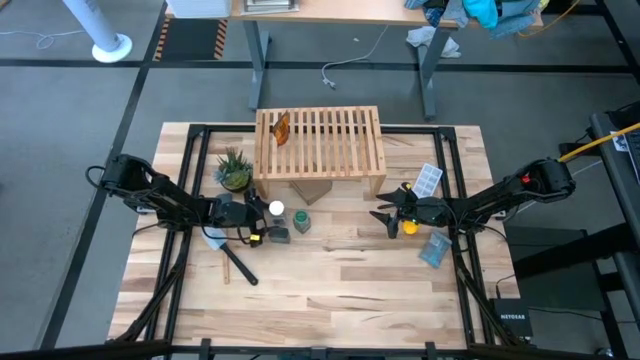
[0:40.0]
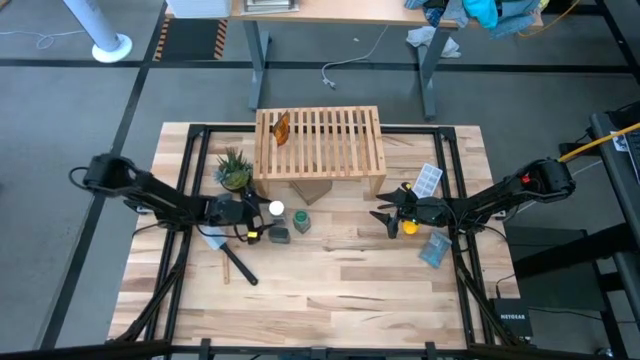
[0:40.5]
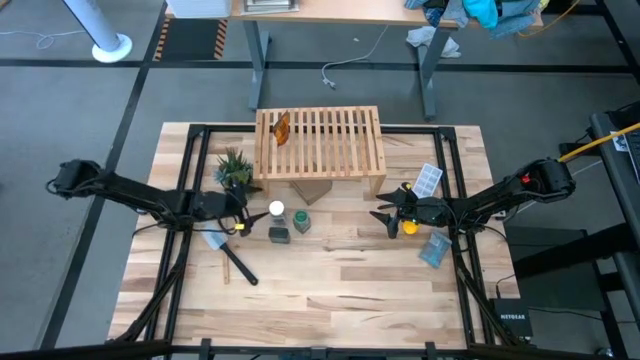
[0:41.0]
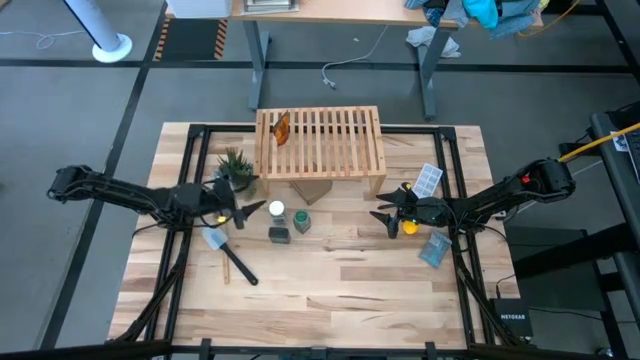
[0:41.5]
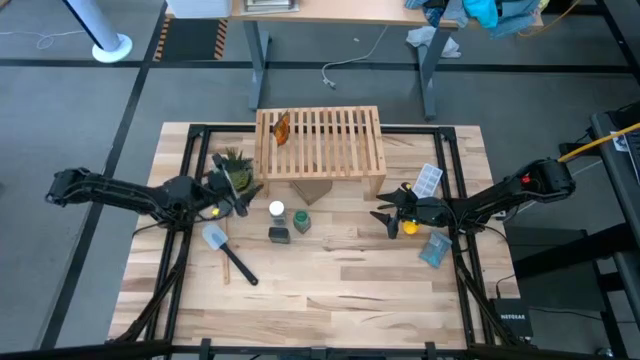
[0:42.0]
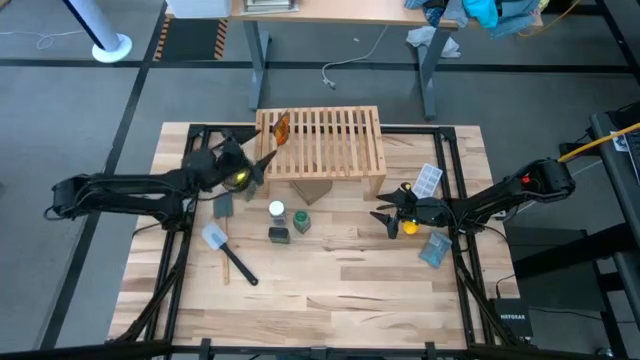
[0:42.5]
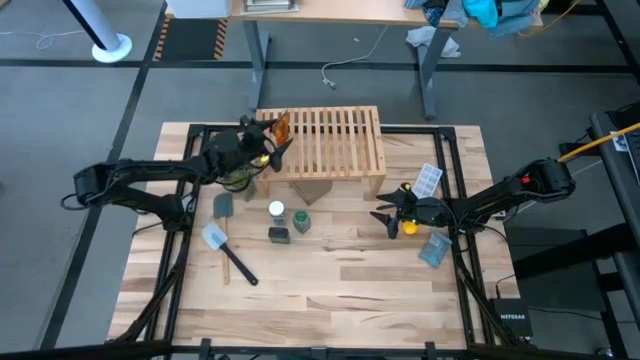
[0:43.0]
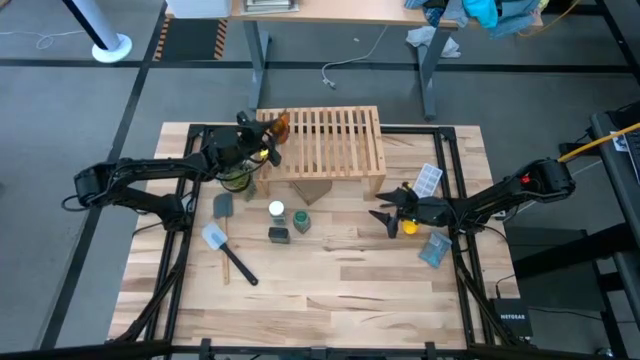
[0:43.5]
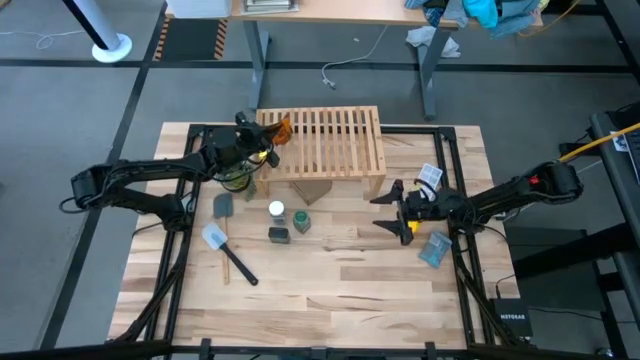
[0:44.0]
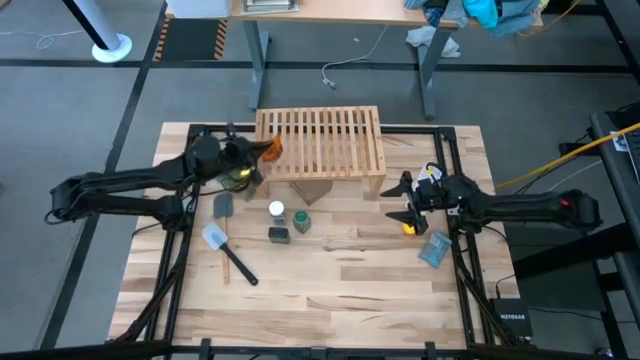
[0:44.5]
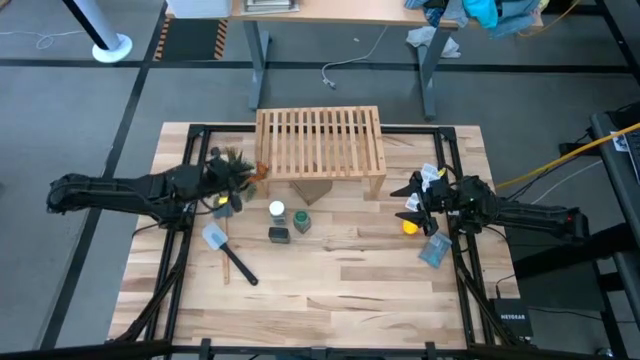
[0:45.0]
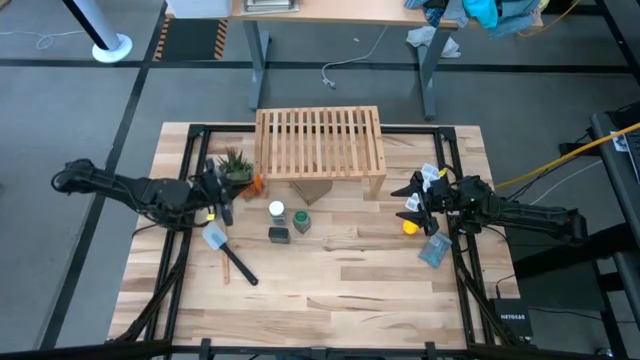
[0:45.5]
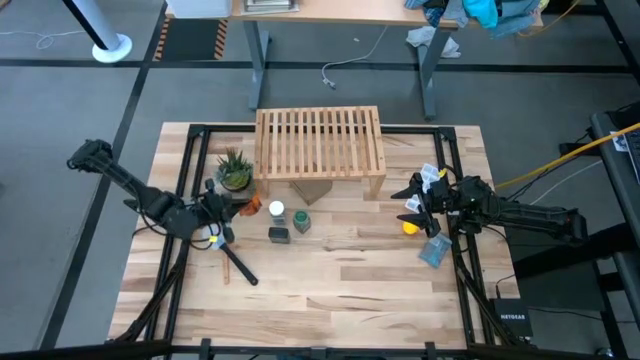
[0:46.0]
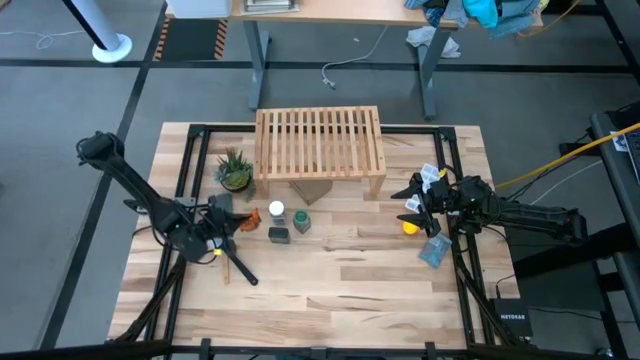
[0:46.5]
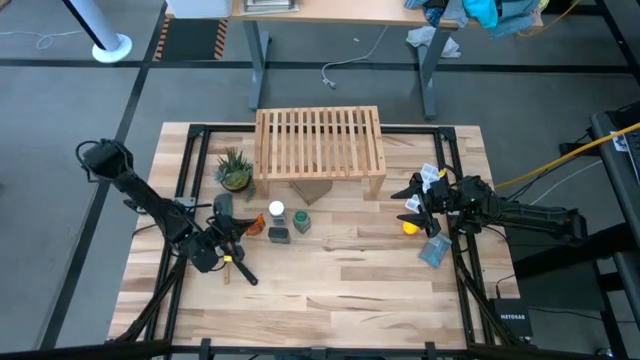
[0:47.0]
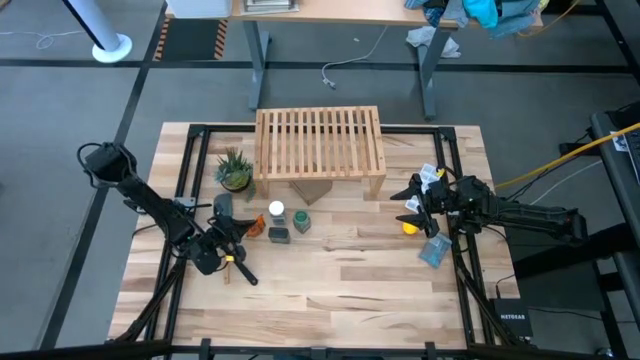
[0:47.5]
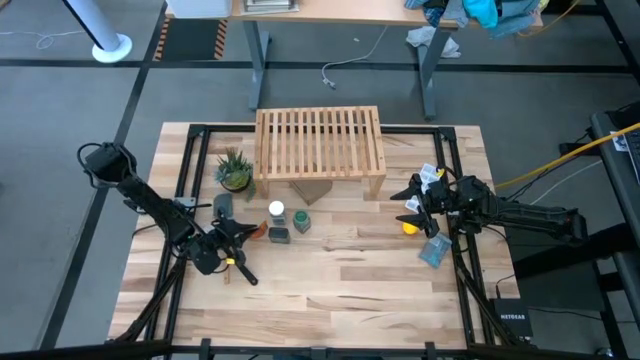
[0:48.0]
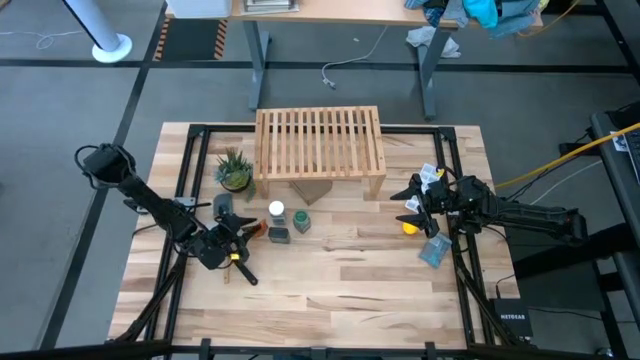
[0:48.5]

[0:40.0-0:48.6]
Task: Shelf spices
Remove the orange seasoning bag from the shelf to the table

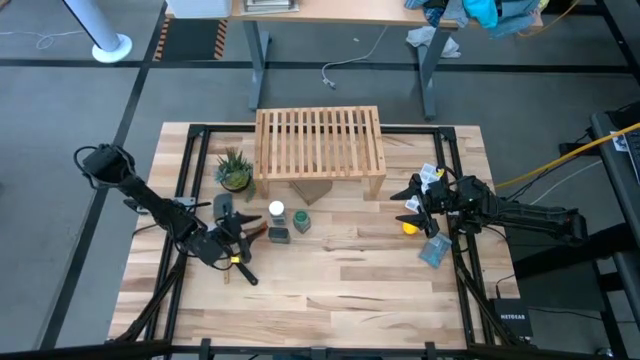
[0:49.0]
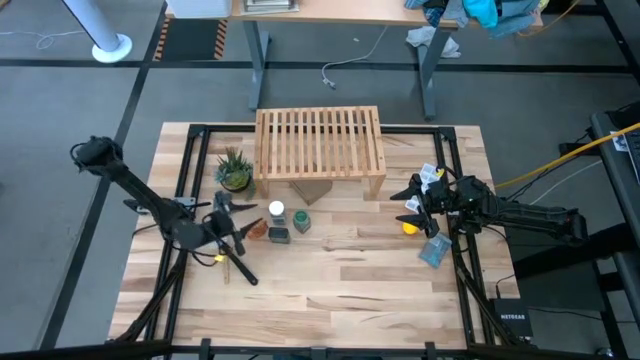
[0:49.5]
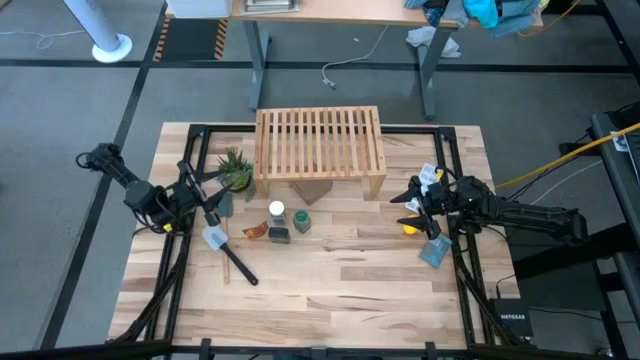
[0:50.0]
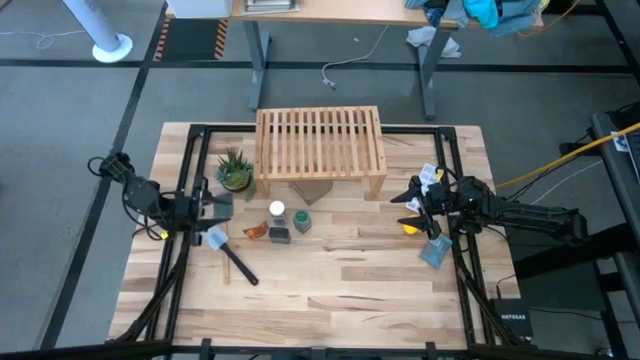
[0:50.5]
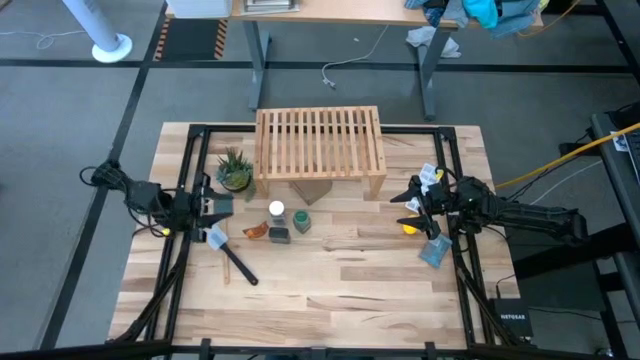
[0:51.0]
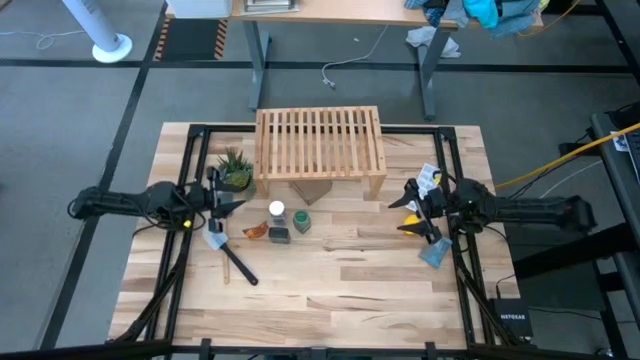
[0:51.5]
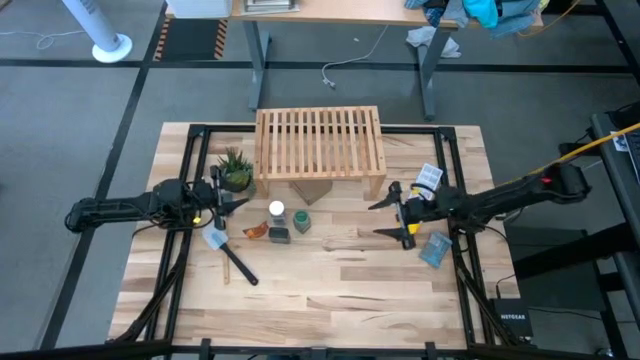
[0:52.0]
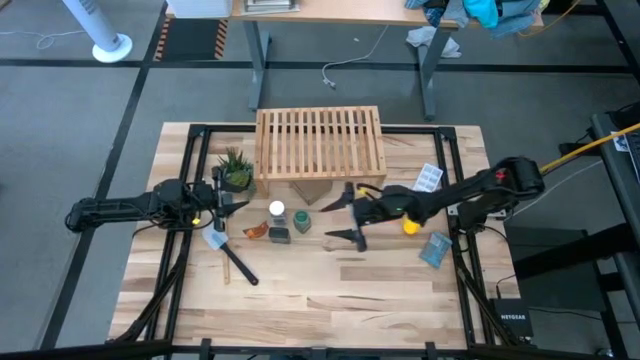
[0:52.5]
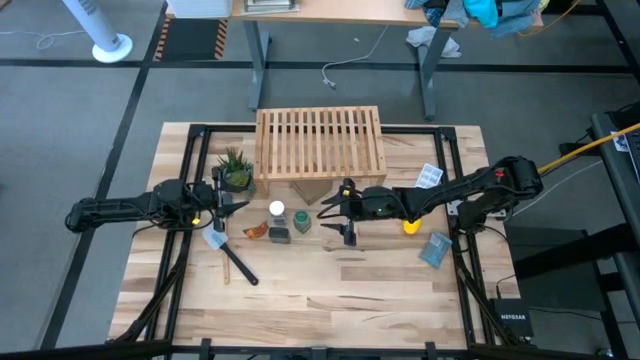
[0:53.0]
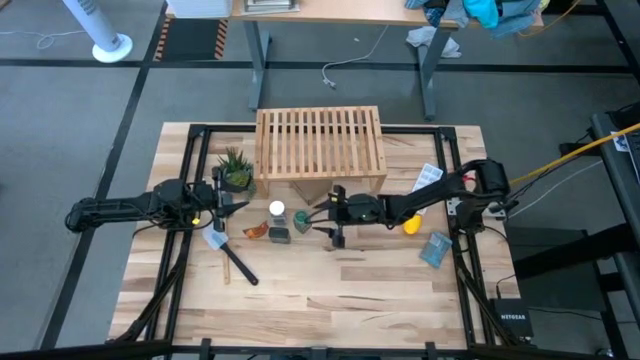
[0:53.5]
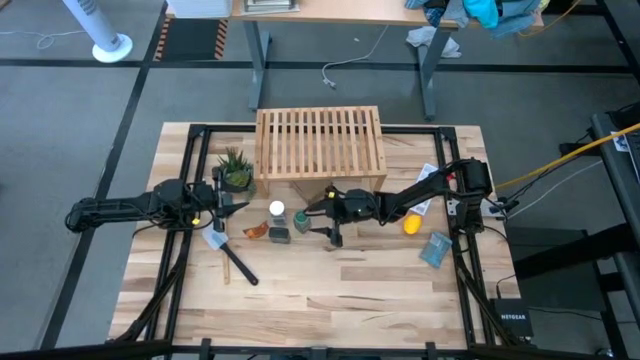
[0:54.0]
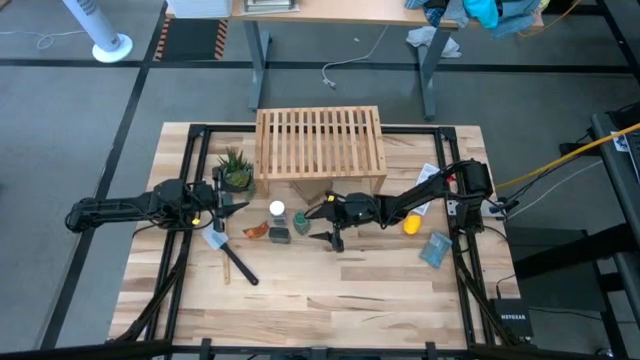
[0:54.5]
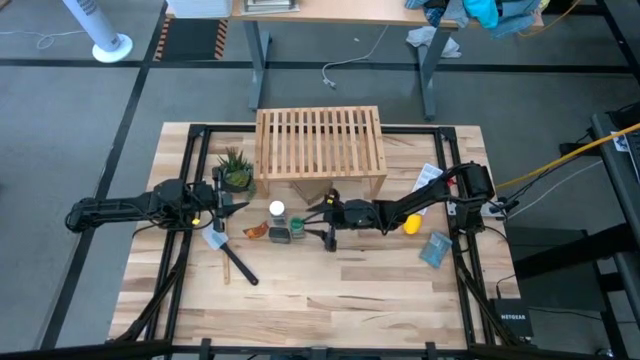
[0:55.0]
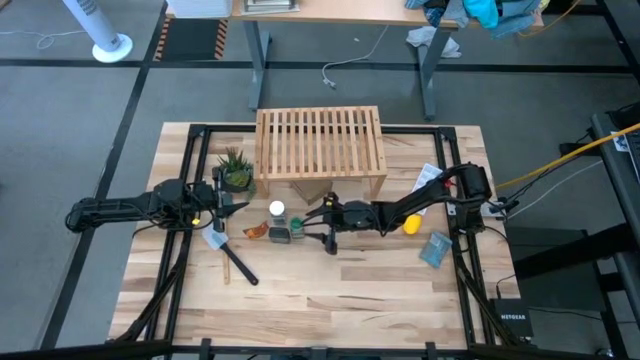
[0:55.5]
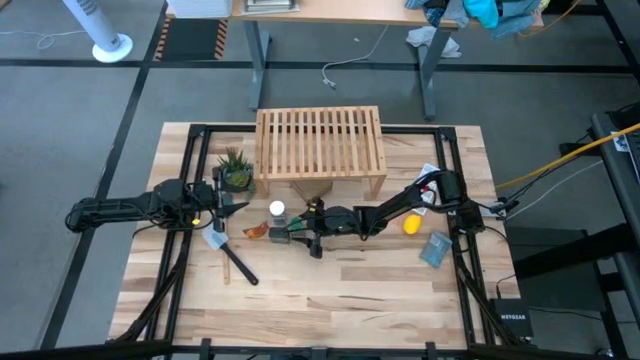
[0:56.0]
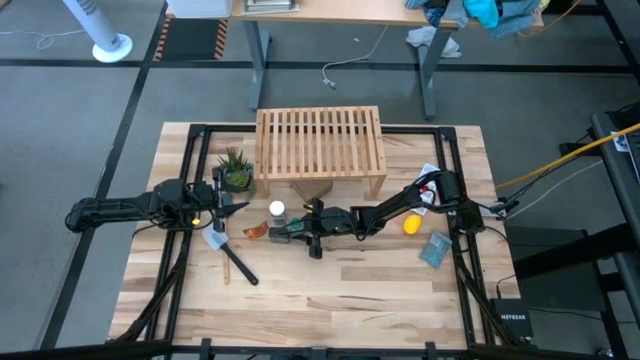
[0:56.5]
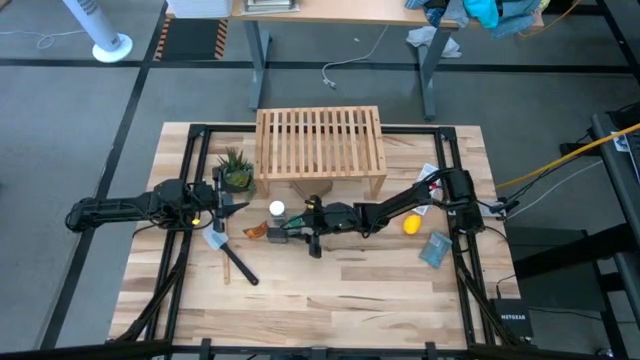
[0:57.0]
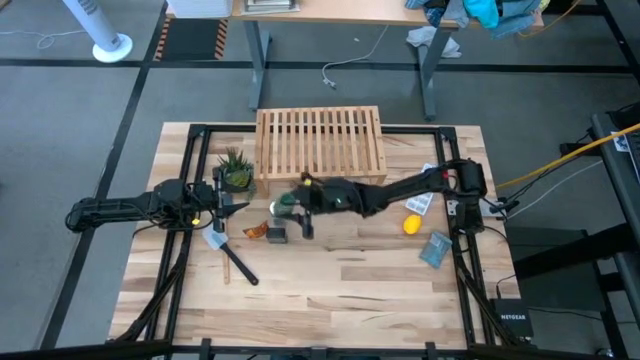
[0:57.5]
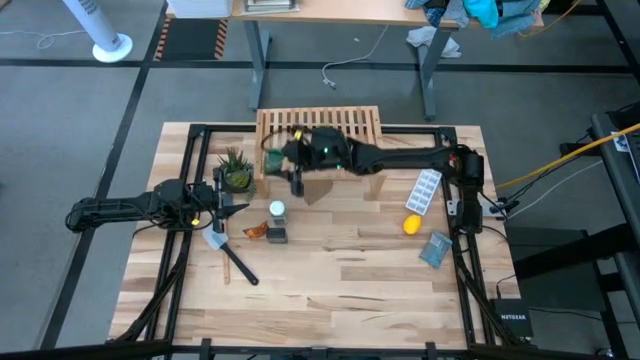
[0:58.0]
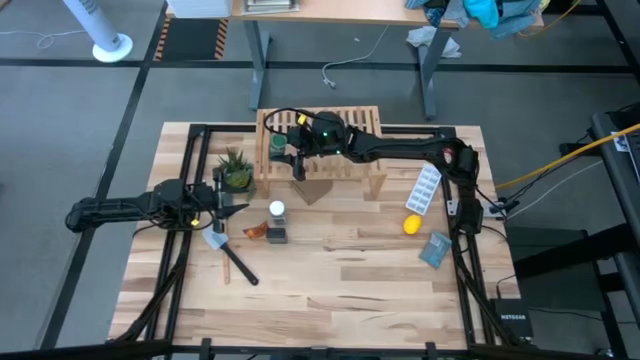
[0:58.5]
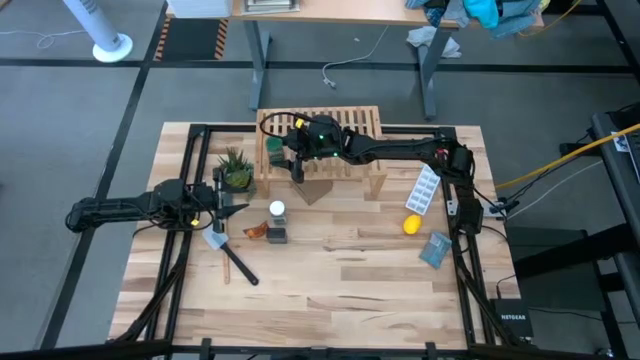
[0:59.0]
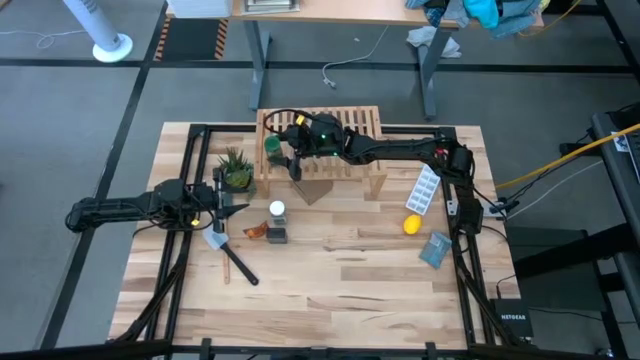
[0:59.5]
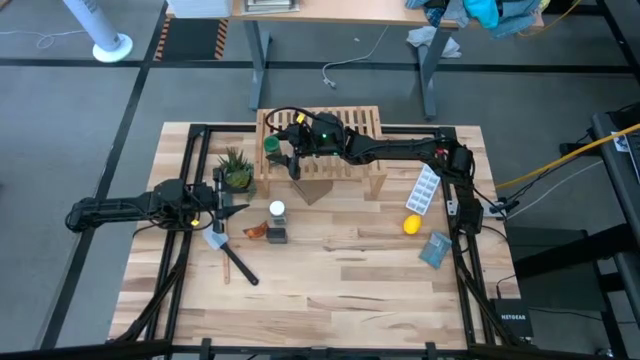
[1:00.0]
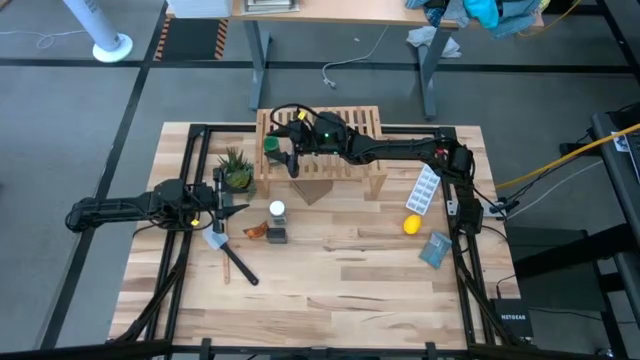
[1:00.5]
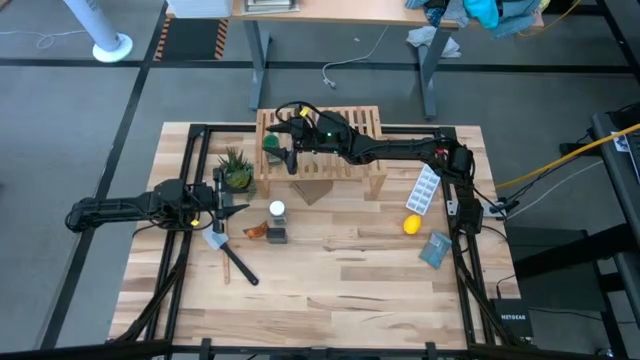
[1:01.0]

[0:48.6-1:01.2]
Put the green seasoning bottle on the shelf
